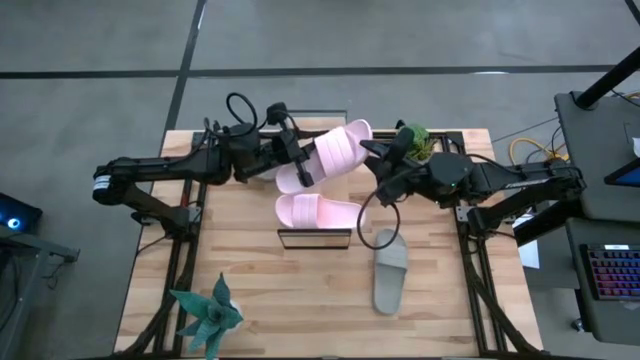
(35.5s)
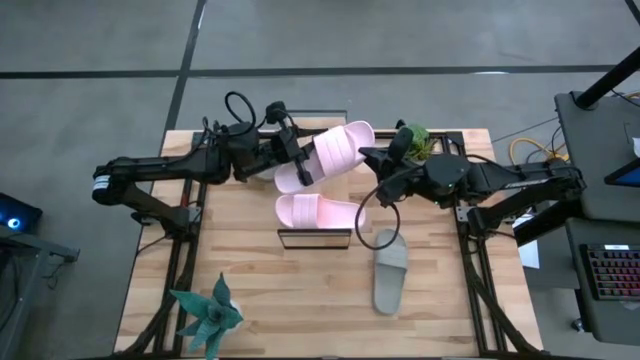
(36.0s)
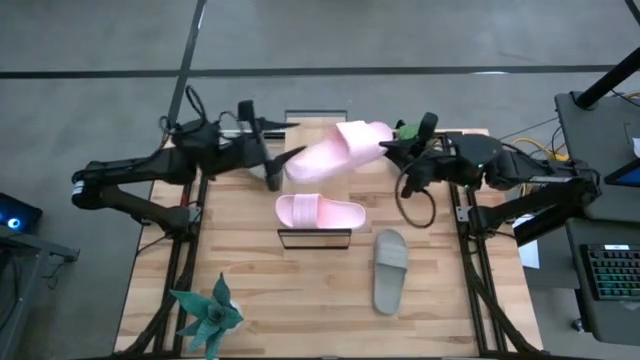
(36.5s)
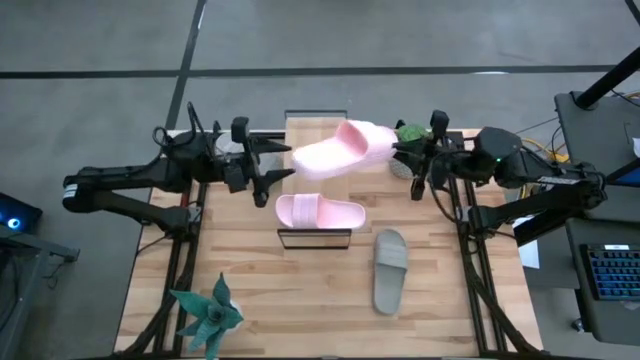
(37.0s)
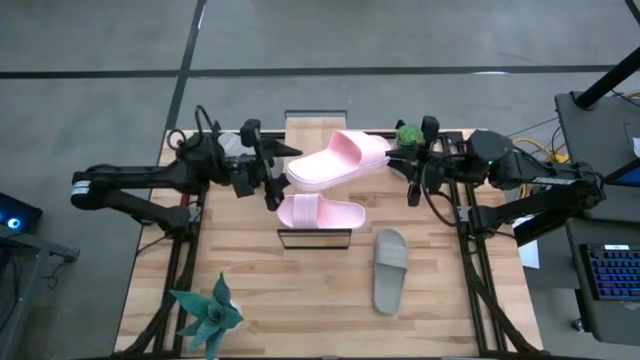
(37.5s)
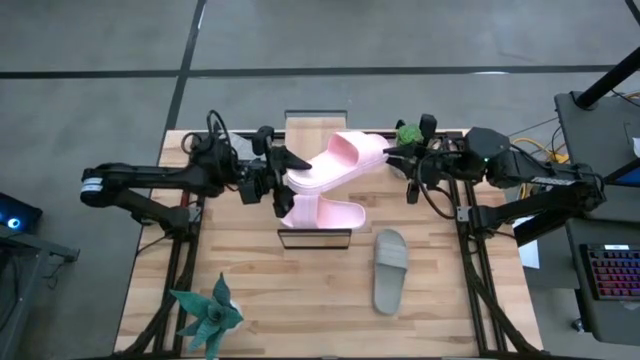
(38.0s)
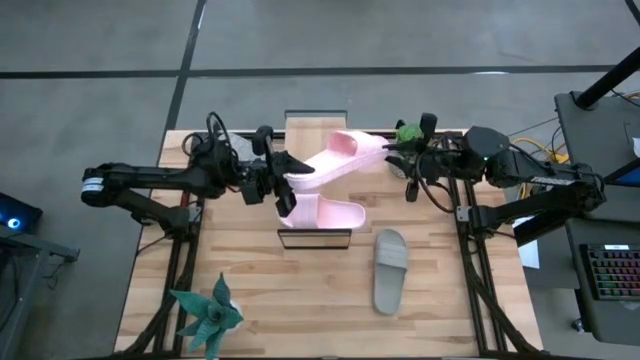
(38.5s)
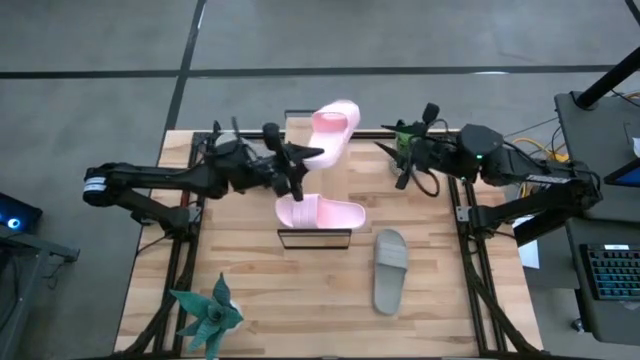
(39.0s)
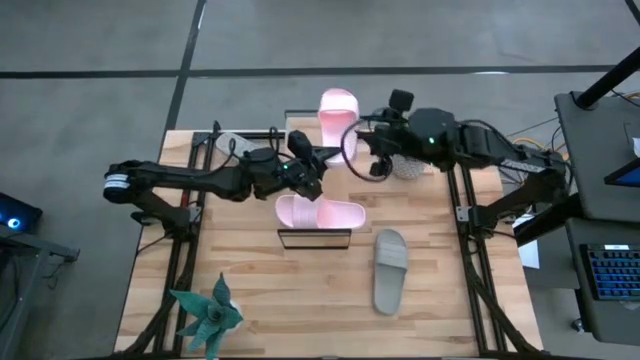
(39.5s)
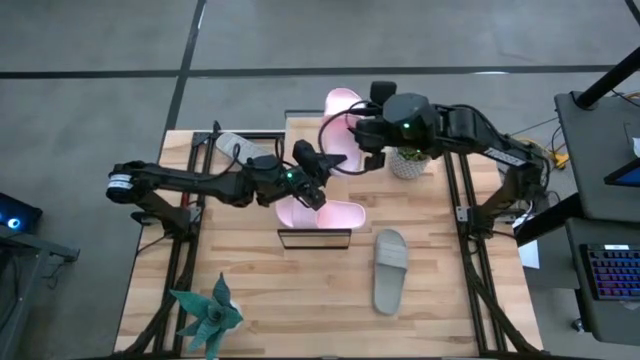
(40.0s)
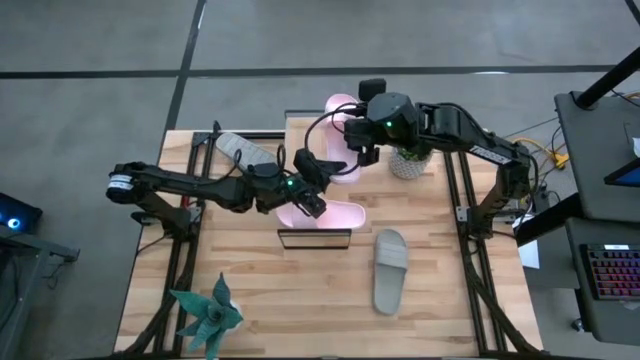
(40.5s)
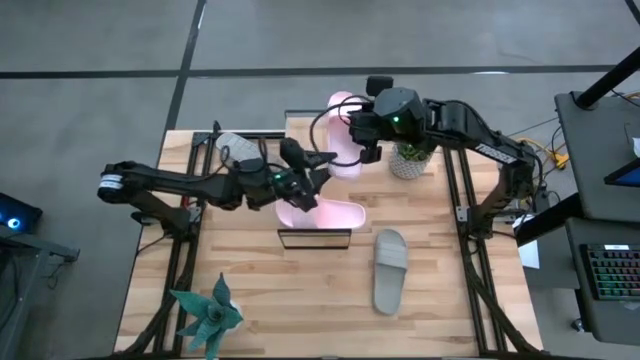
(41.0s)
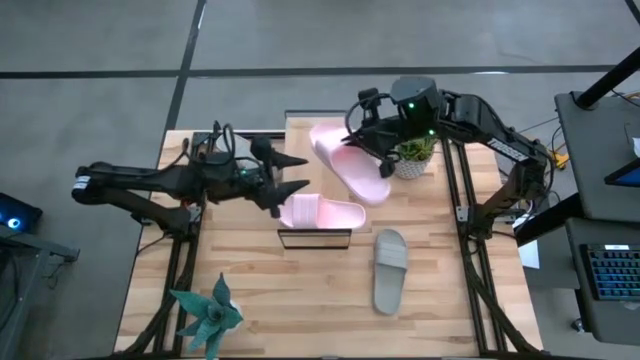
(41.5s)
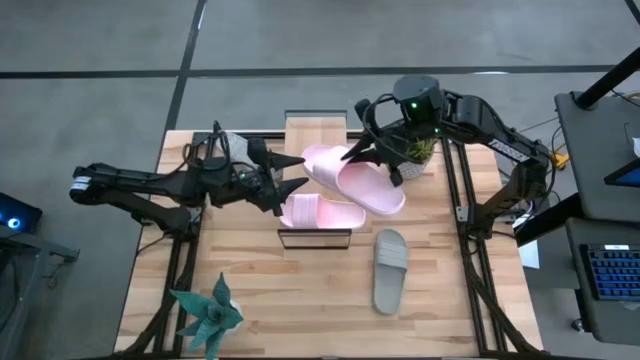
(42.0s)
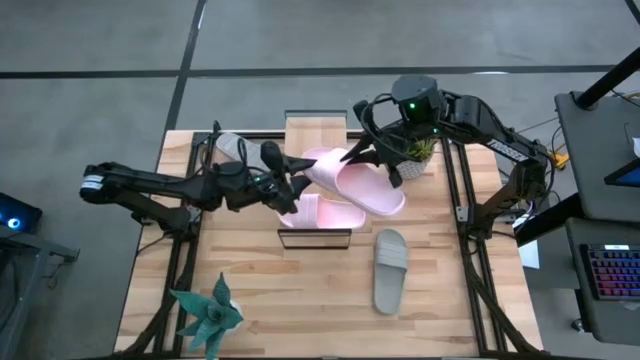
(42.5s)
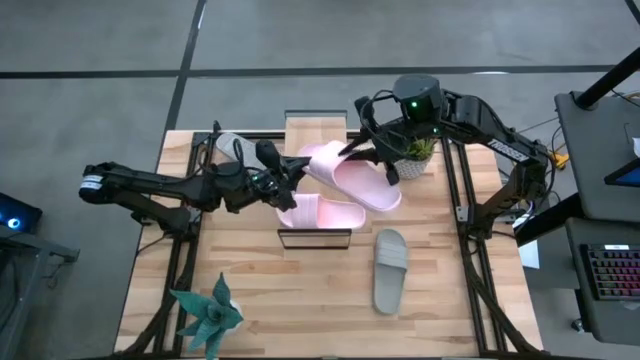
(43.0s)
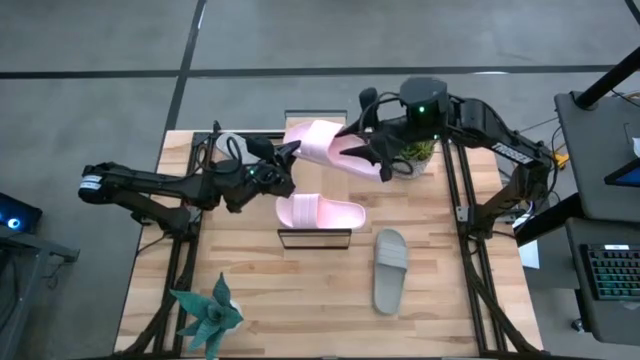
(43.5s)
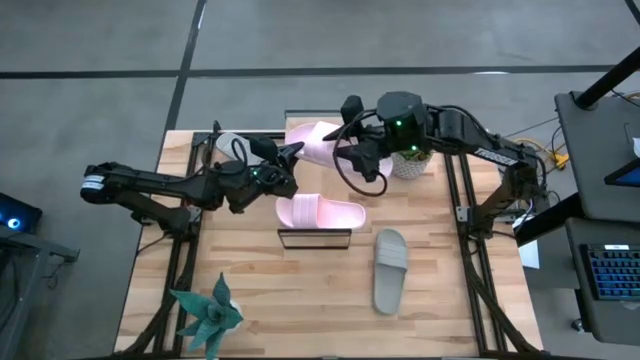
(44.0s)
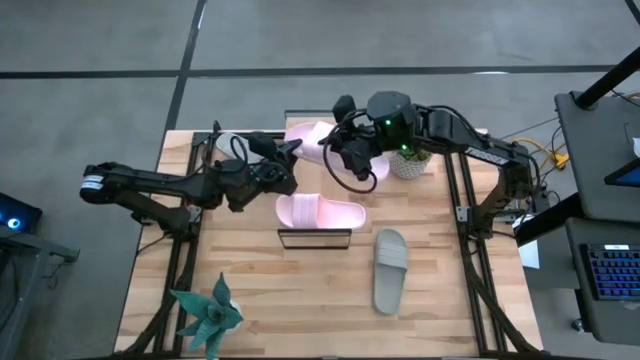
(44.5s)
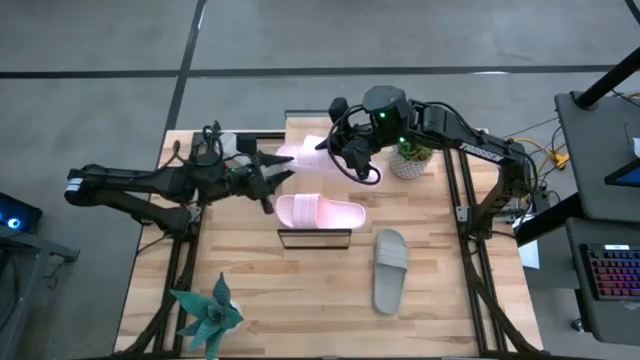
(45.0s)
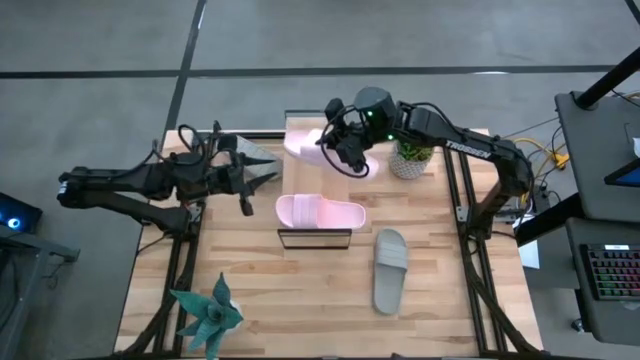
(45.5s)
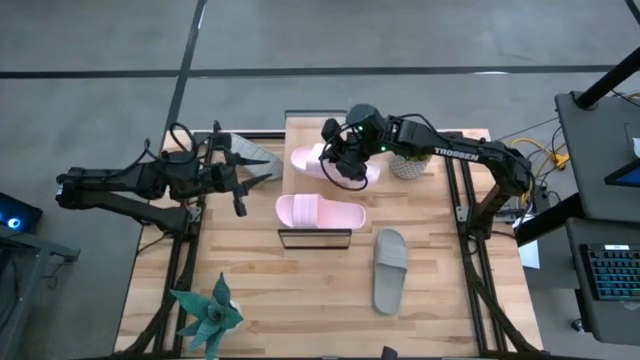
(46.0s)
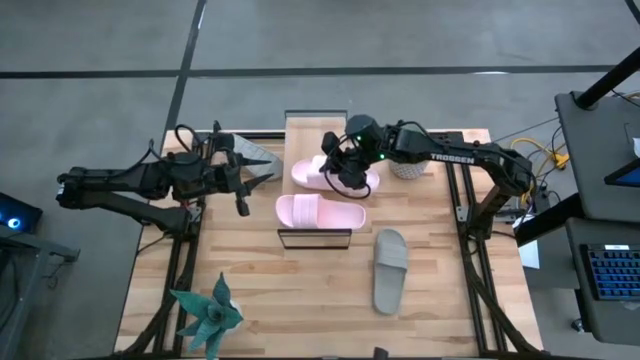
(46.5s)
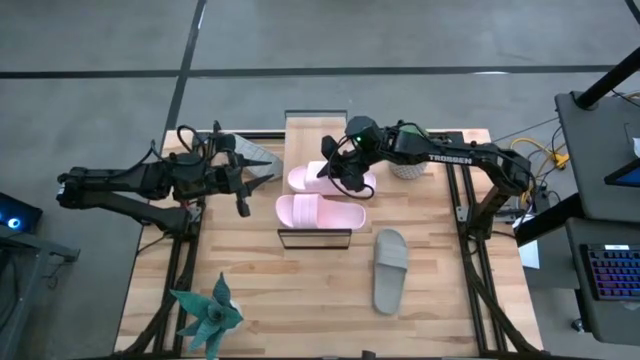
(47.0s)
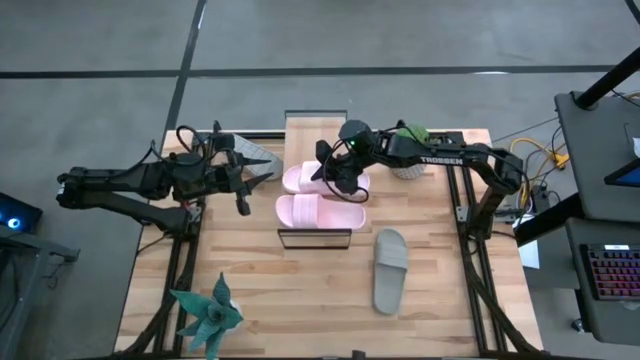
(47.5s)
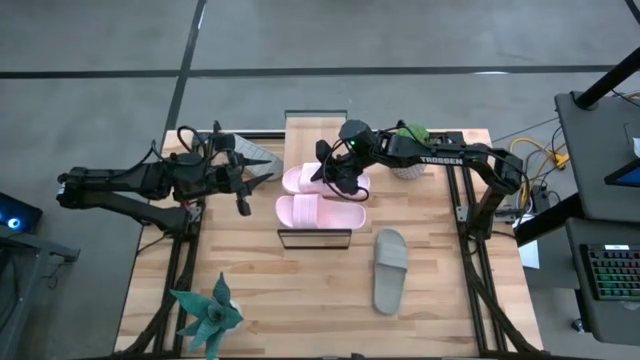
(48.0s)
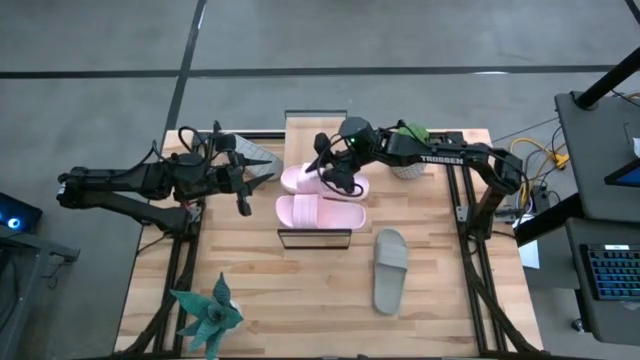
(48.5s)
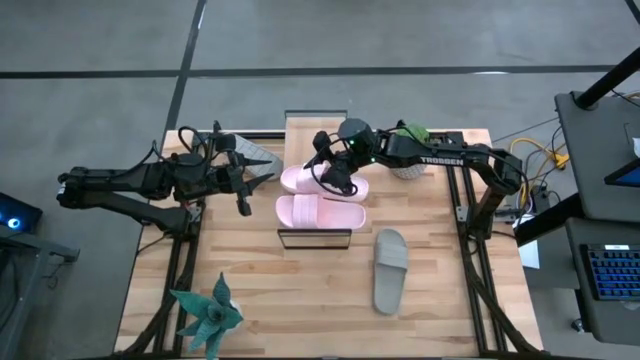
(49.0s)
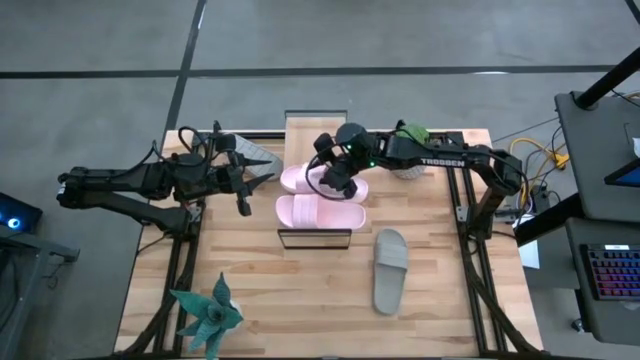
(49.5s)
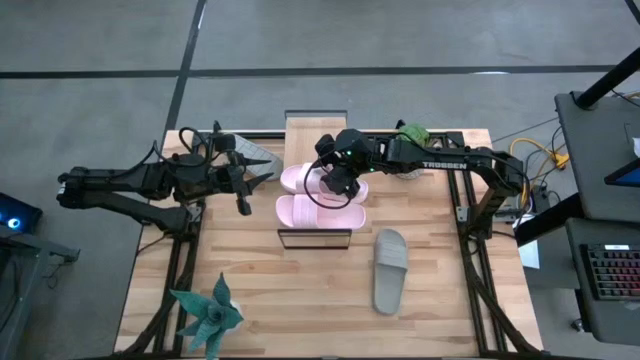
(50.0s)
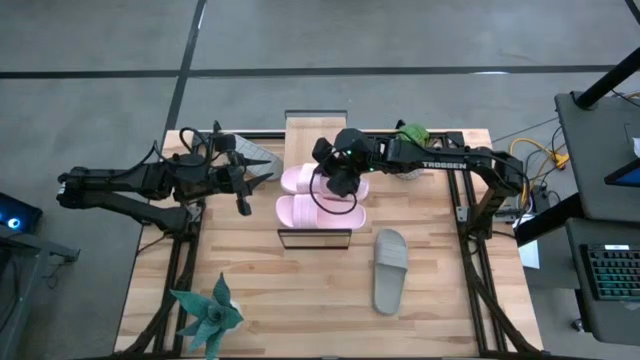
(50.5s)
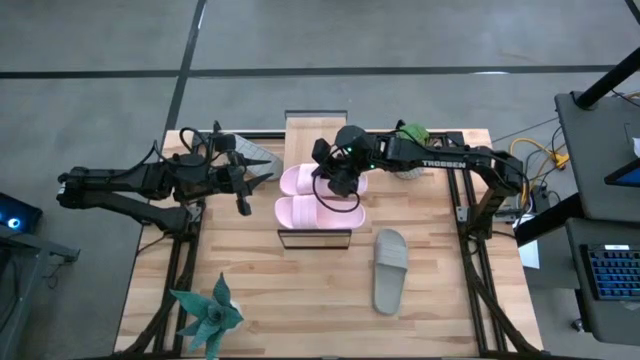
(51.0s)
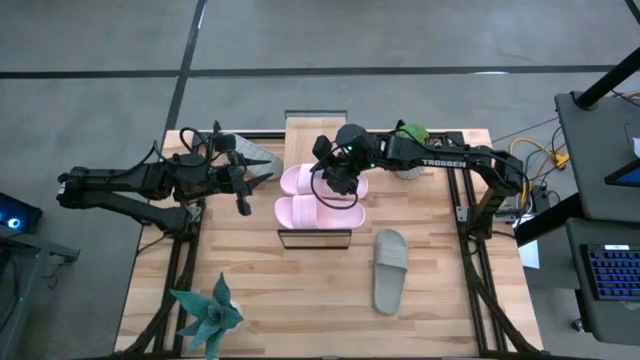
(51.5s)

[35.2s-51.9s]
Task: Pick and place slides into the shelf
Put the pink slipper on the shelf
